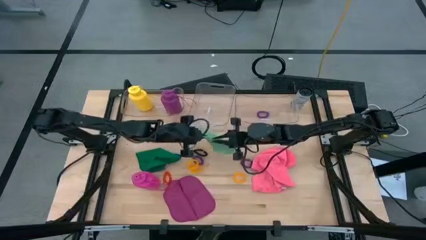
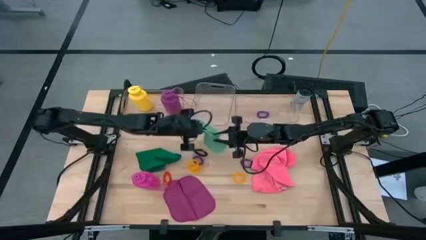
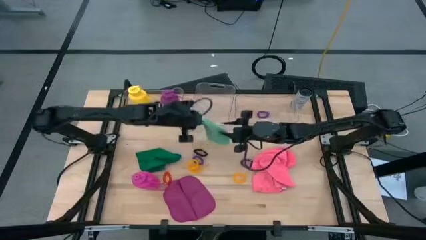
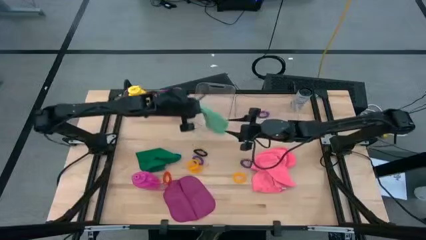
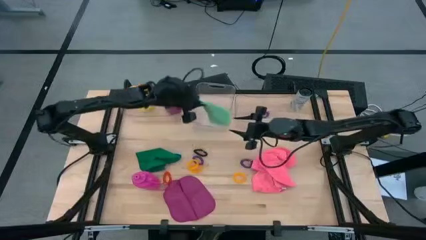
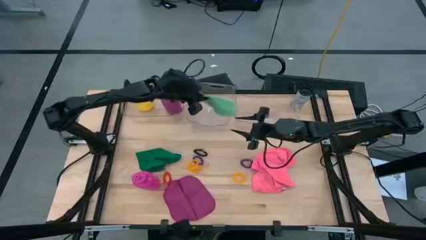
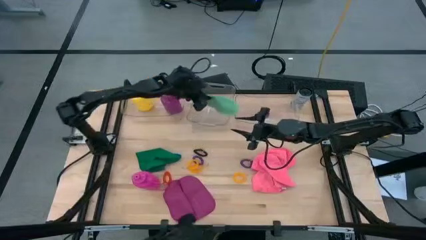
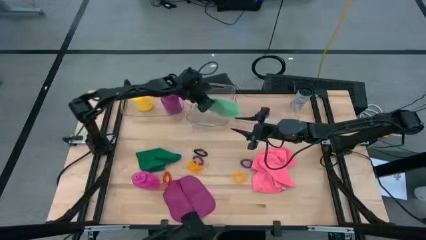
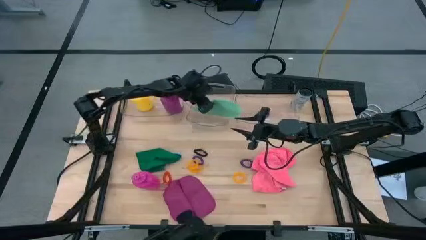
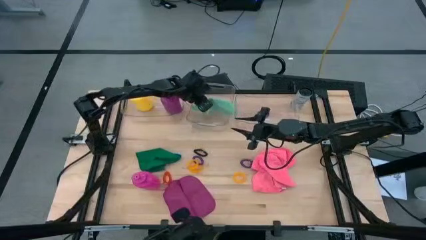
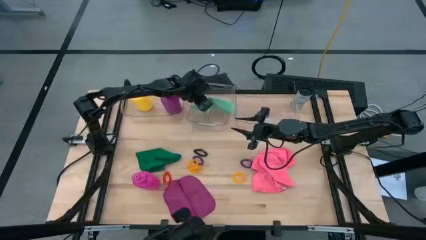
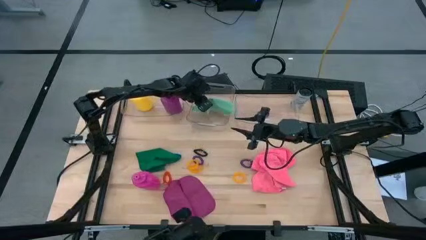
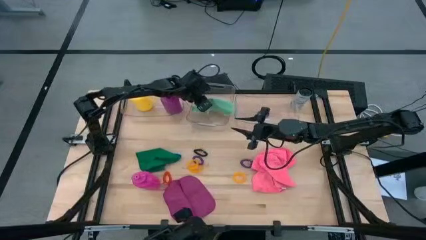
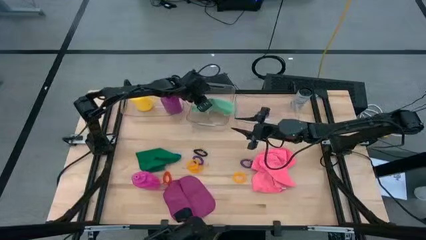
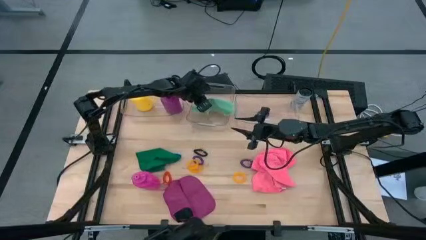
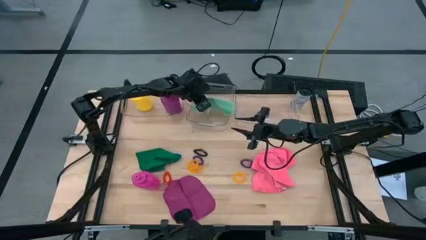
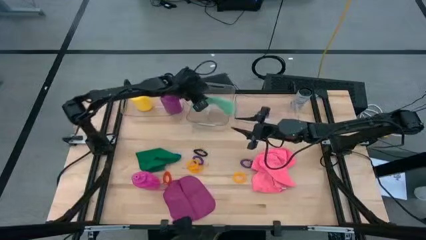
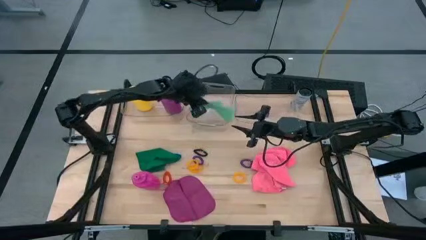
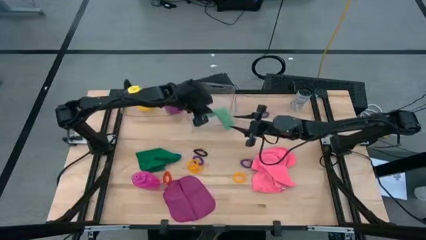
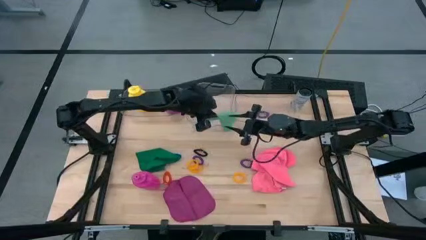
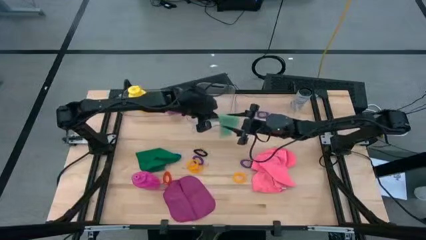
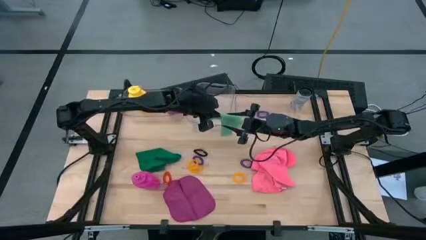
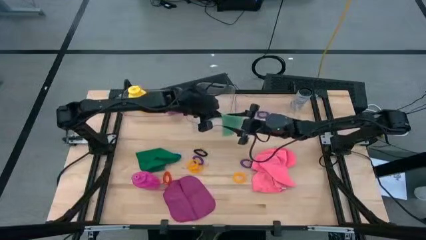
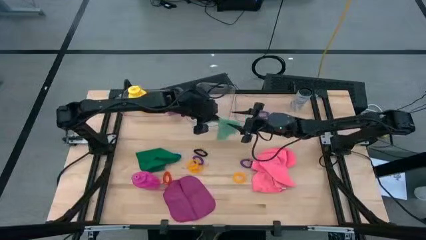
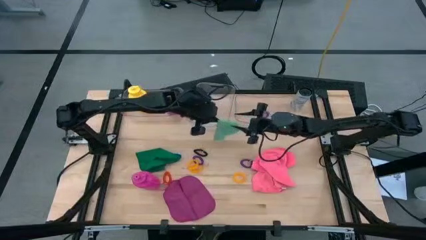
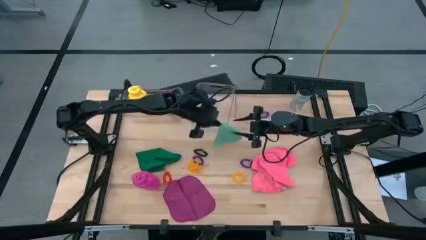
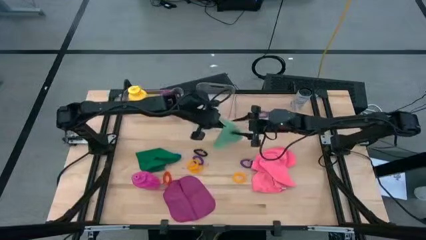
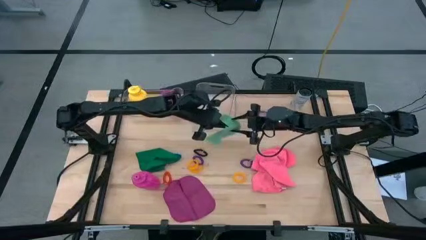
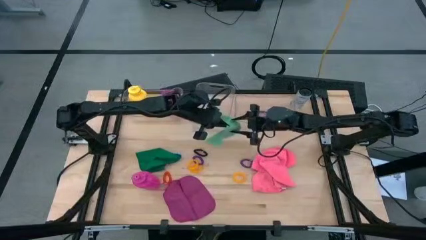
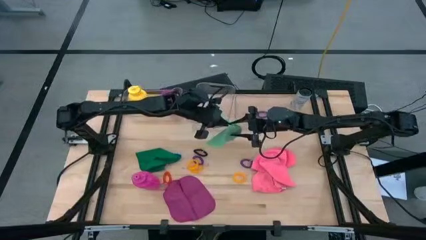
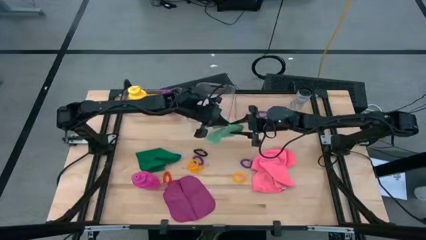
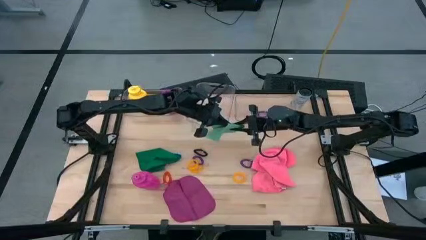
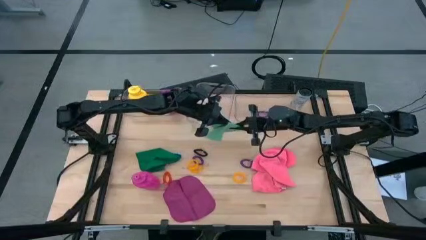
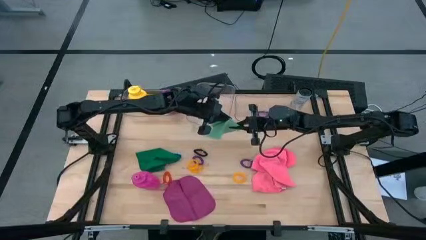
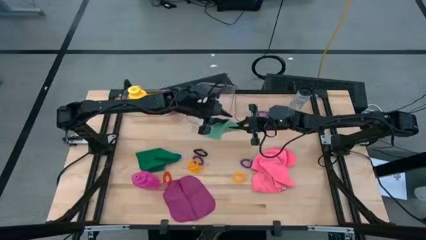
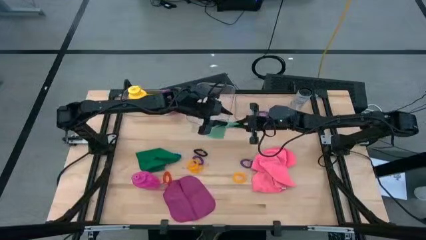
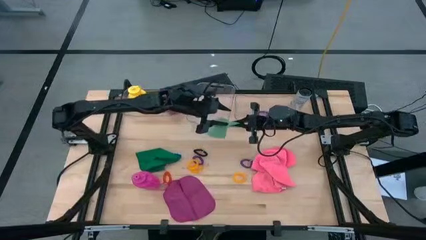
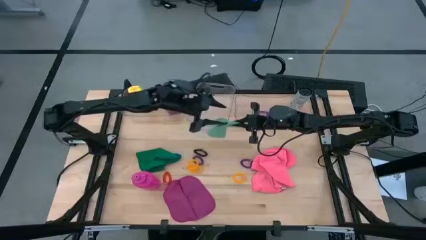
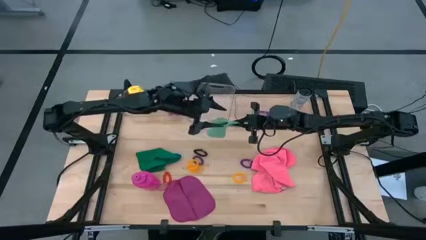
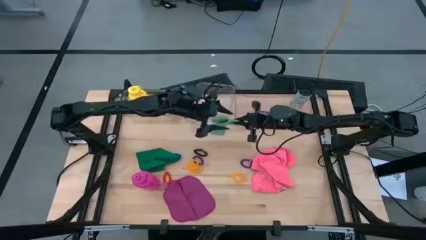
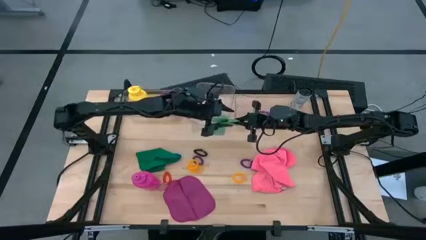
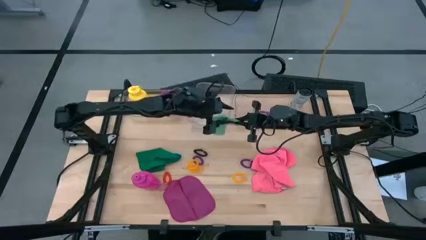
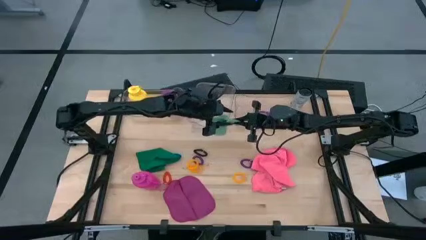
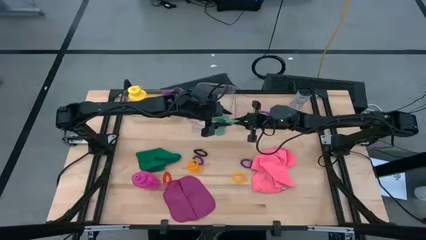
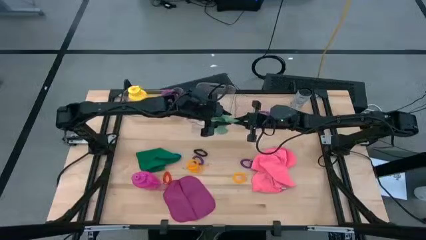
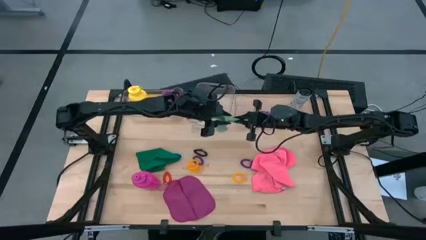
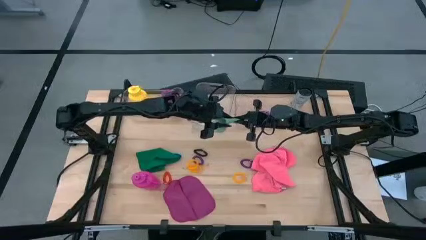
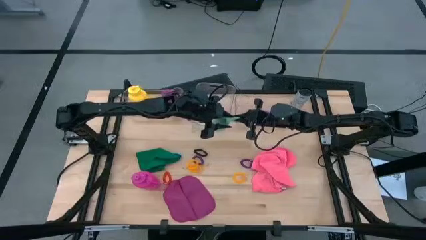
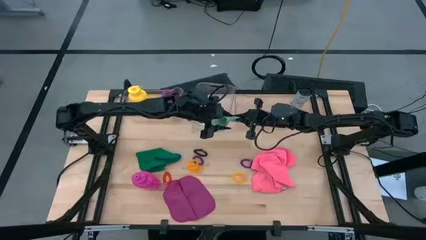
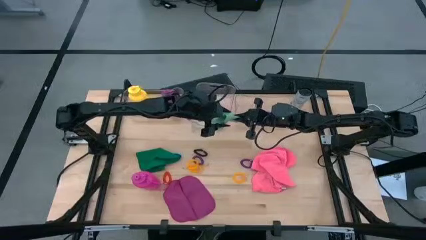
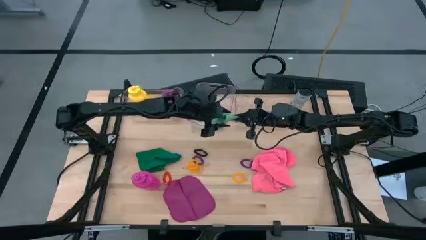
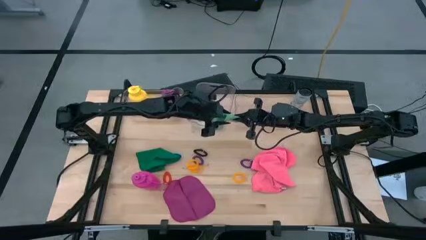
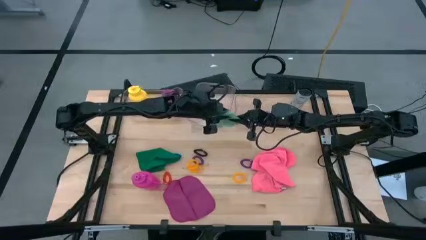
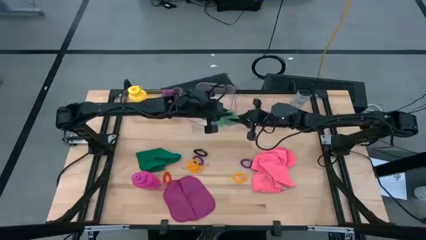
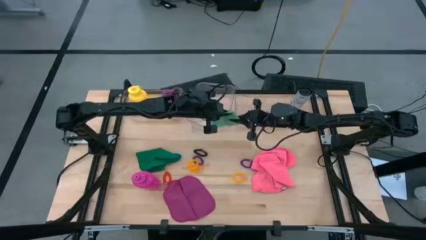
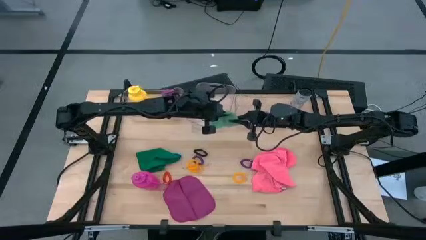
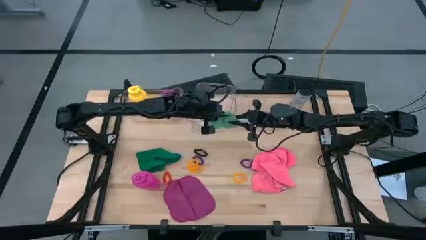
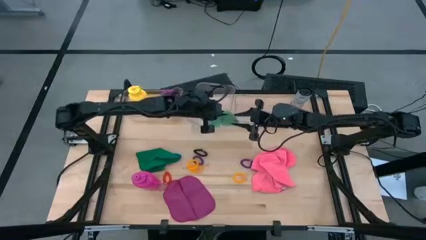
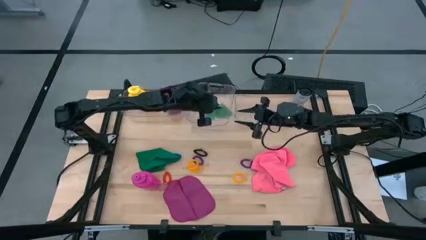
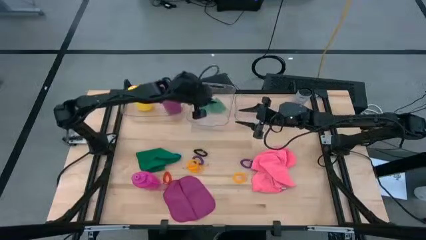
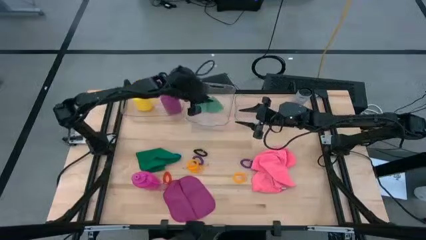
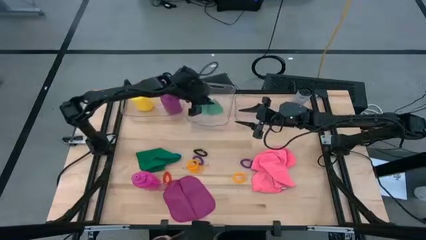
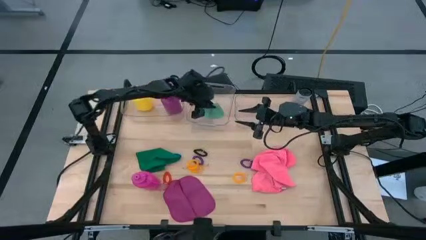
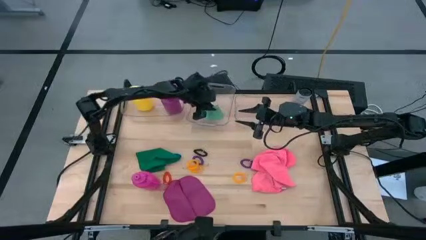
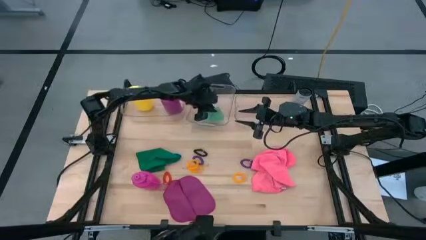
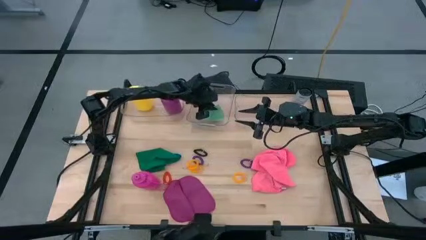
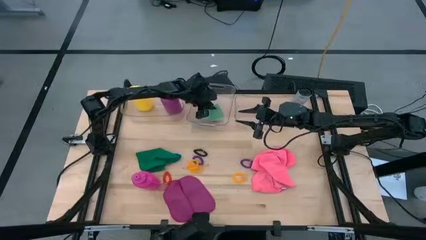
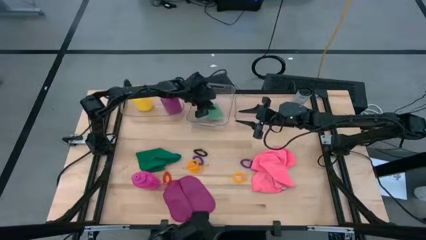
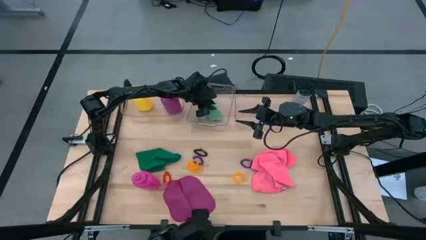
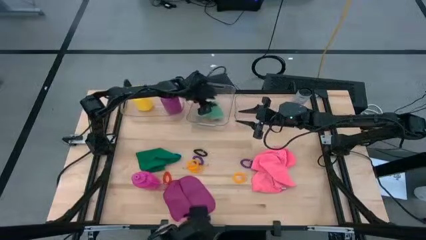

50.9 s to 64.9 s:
Task: Pick & Place Sports Items
Put the light green microfiber towel into the middle transparent bin
